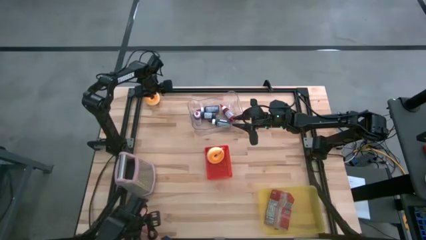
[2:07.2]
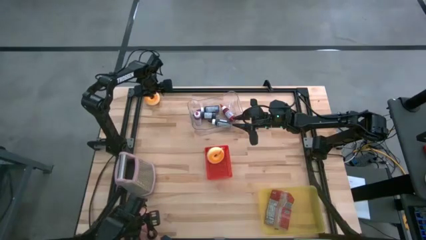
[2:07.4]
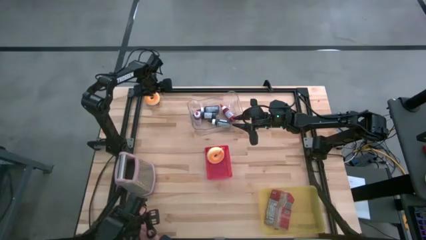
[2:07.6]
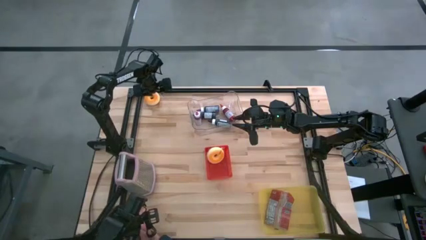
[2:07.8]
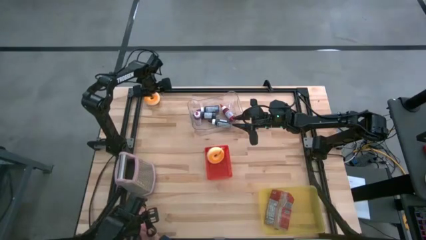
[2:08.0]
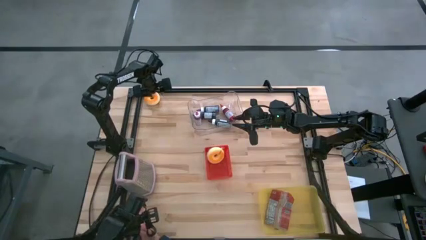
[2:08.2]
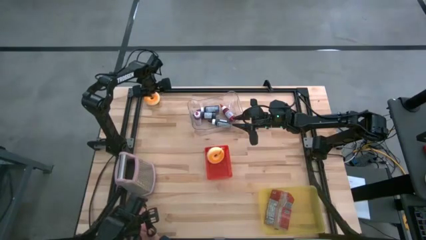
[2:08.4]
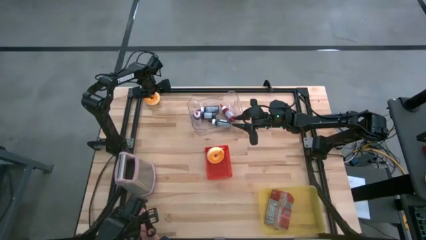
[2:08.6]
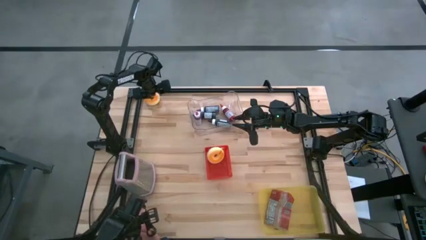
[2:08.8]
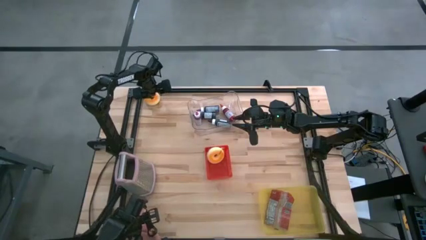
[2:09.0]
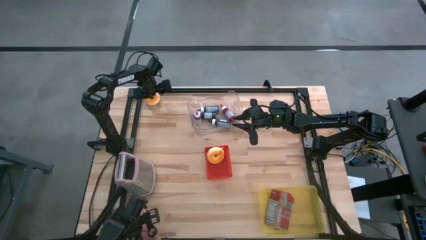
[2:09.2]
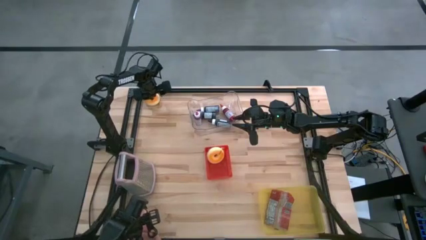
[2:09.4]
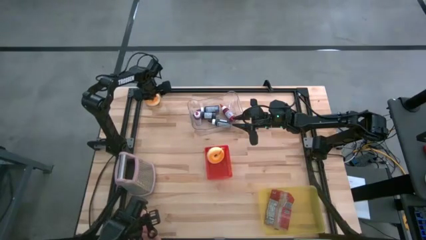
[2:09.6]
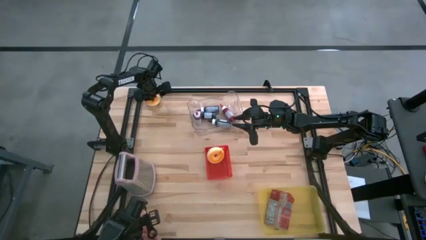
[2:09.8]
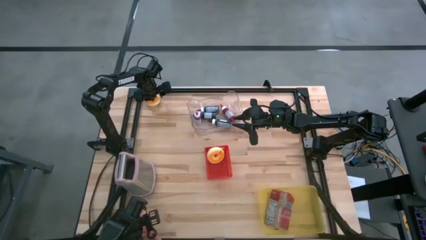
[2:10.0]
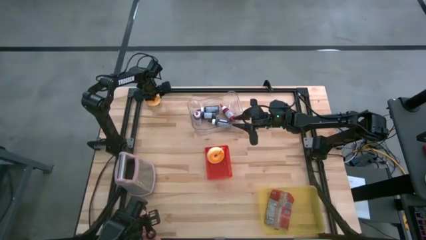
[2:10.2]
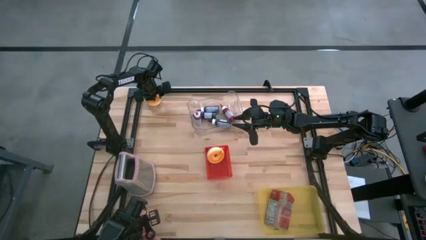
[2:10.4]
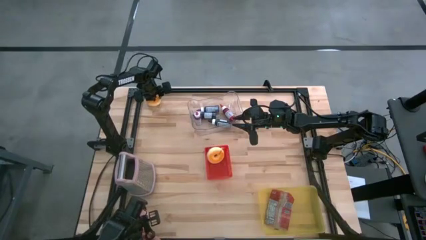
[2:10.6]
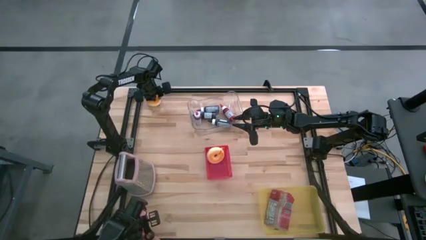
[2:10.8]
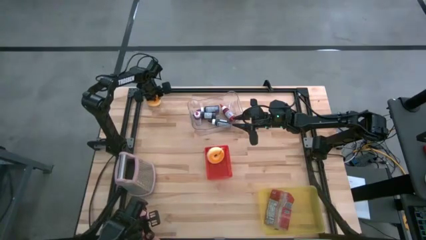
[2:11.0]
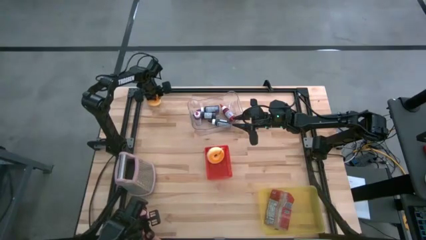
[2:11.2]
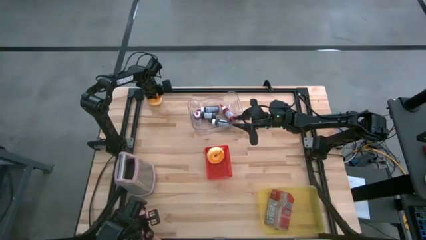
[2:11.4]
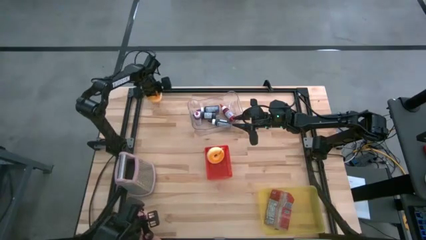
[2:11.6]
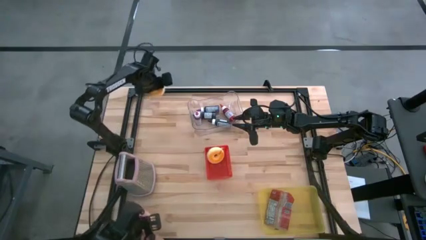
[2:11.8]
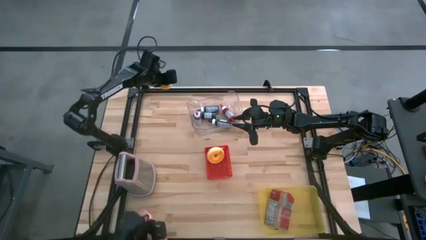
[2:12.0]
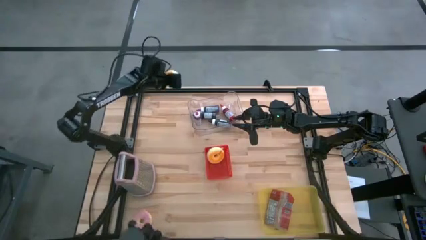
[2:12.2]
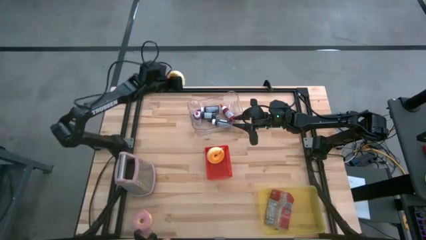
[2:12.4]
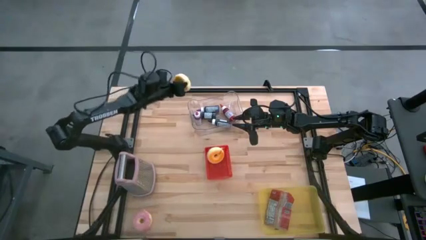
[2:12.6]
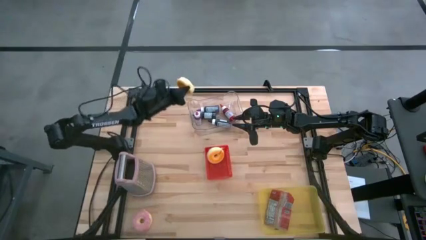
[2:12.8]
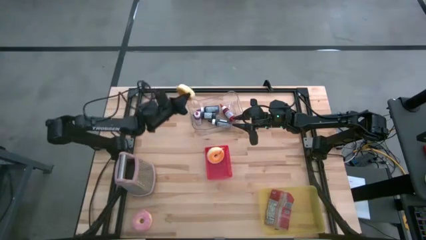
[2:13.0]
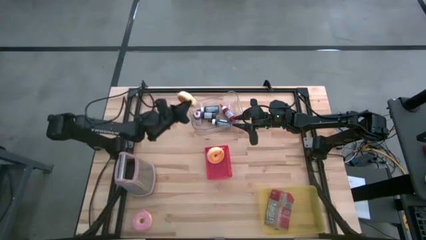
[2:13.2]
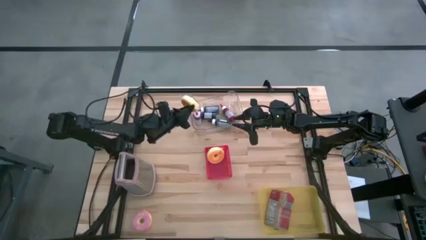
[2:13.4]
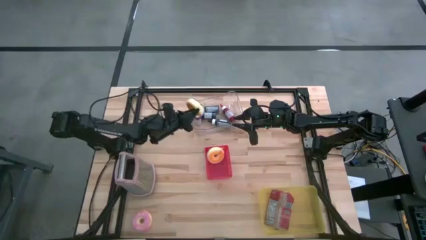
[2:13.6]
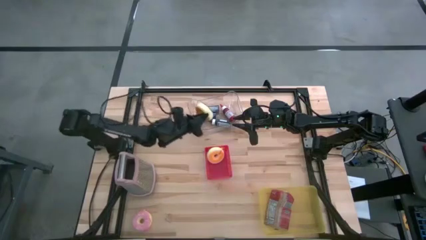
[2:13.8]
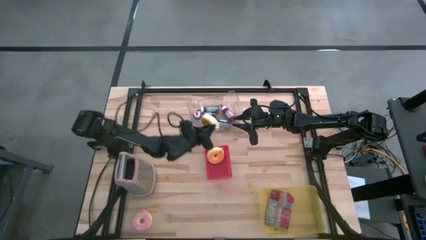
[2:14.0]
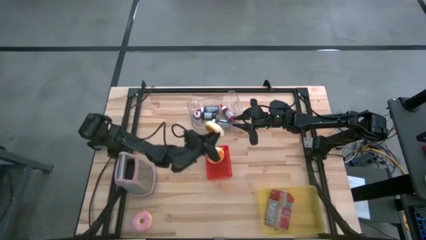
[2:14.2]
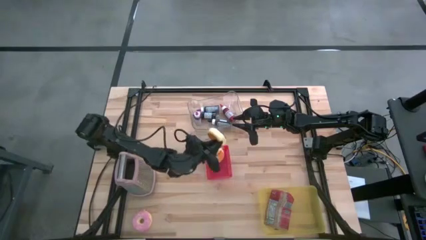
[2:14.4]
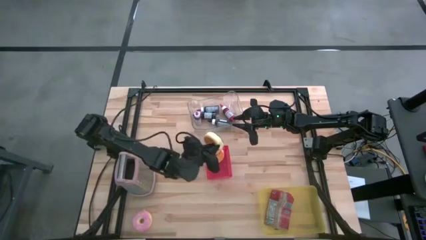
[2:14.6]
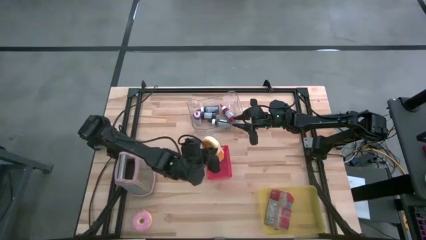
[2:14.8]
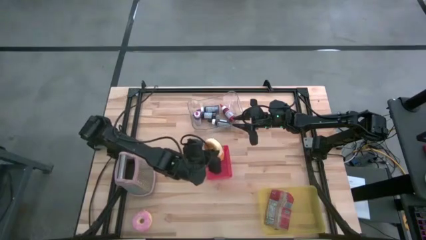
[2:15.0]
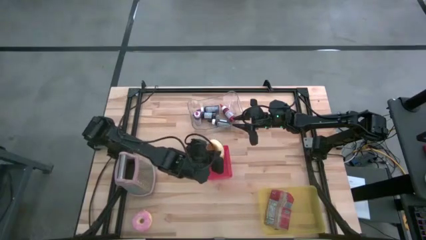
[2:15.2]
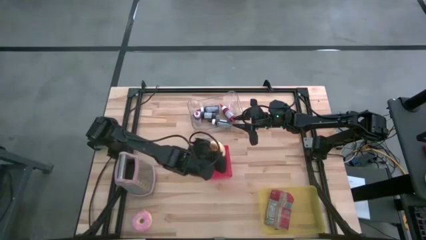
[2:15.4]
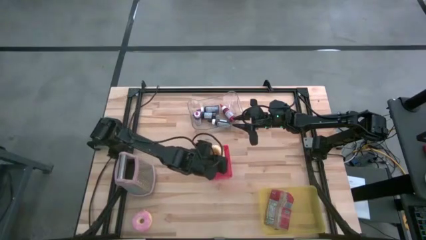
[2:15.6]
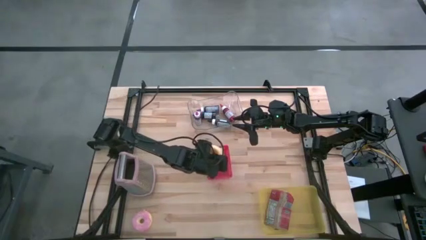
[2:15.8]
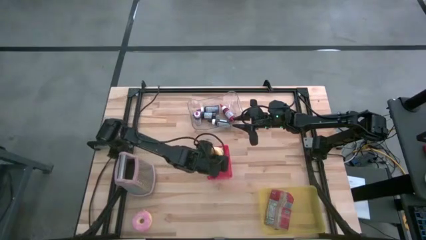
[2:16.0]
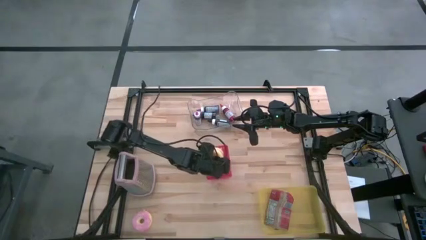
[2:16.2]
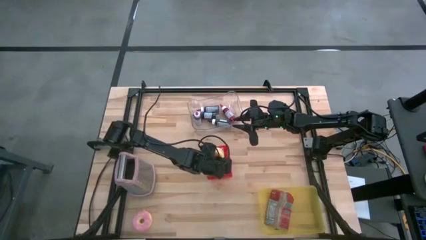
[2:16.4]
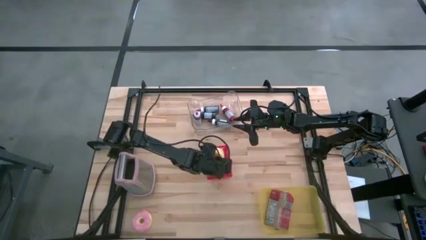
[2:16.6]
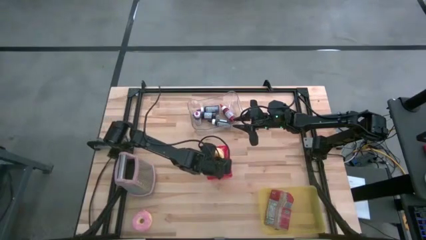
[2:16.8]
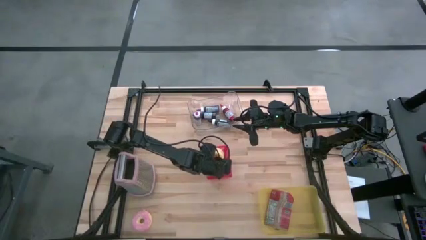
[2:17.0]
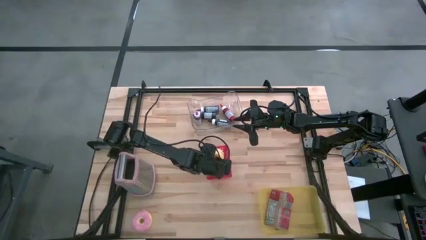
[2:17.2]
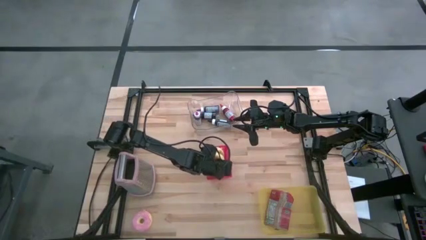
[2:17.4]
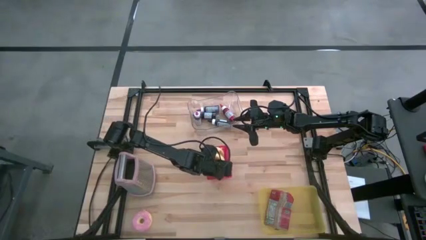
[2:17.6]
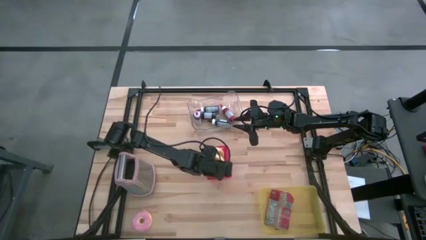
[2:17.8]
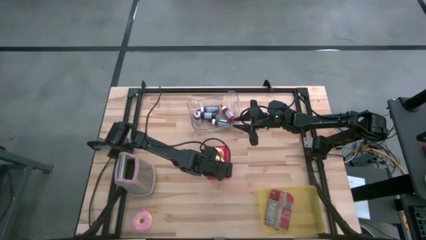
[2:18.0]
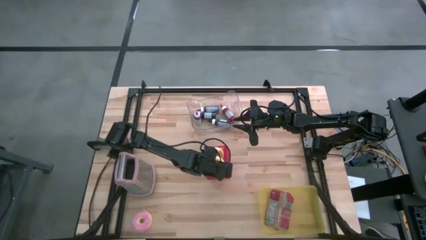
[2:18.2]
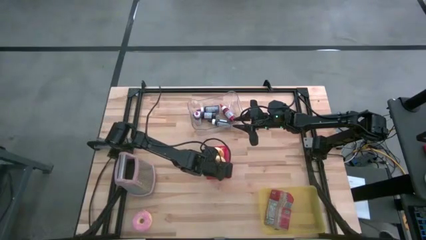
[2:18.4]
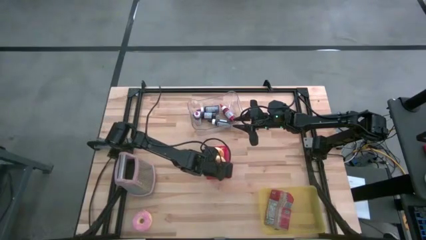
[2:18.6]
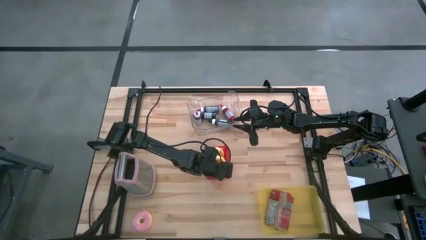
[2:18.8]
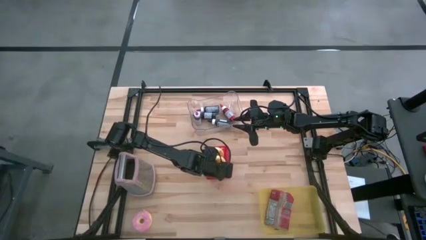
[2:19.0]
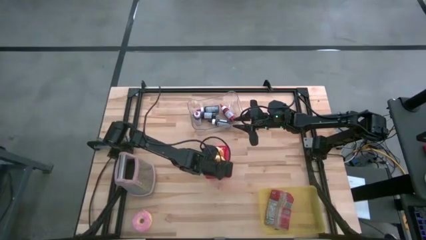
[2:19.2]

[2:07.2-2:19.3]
Task: Pick & Place Food Item
Put the black donut into the red bin

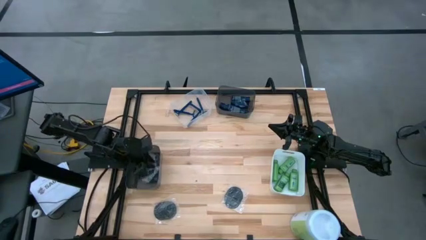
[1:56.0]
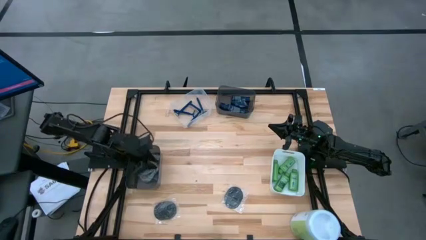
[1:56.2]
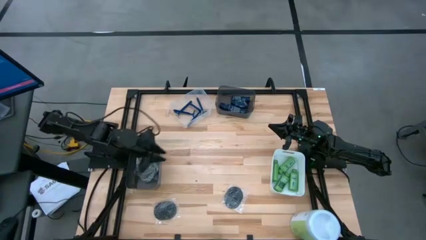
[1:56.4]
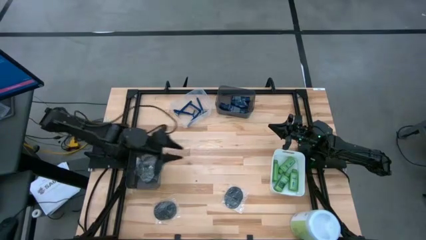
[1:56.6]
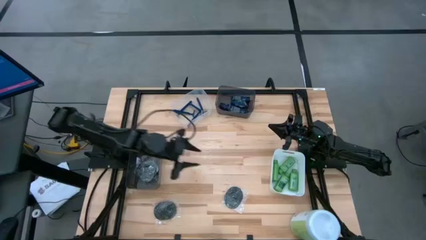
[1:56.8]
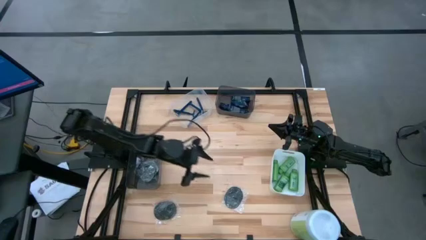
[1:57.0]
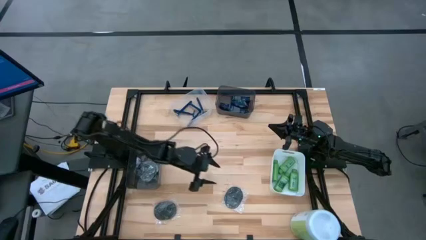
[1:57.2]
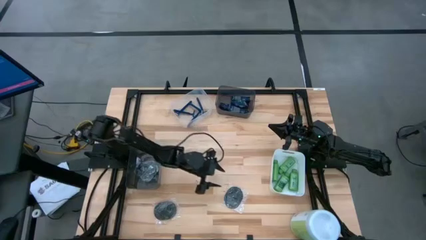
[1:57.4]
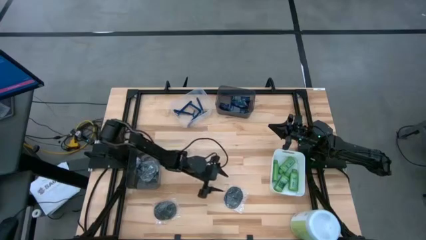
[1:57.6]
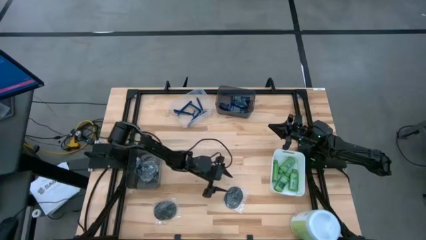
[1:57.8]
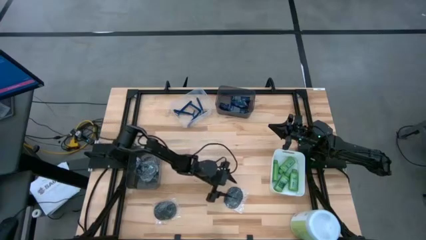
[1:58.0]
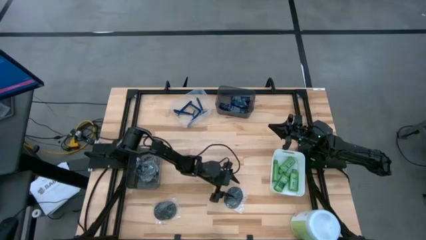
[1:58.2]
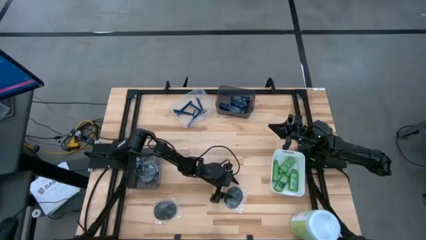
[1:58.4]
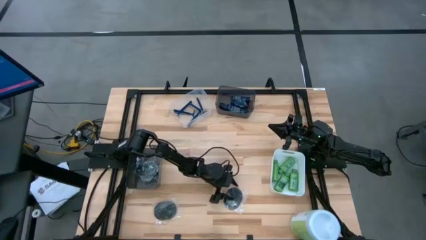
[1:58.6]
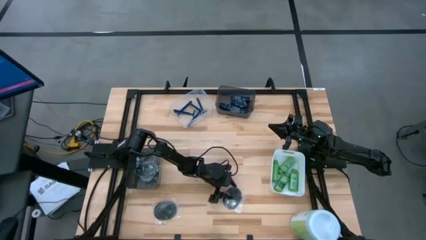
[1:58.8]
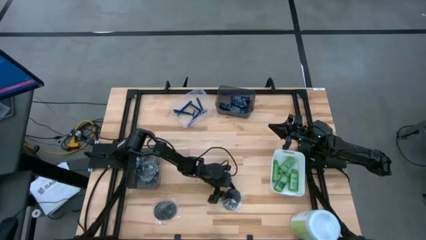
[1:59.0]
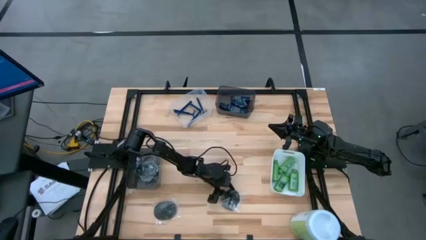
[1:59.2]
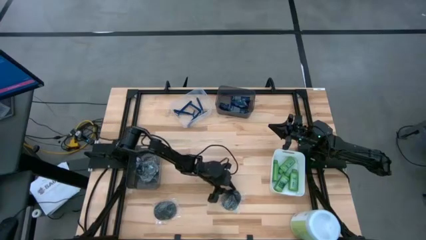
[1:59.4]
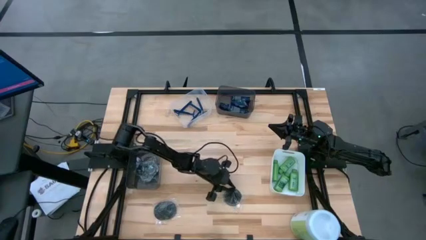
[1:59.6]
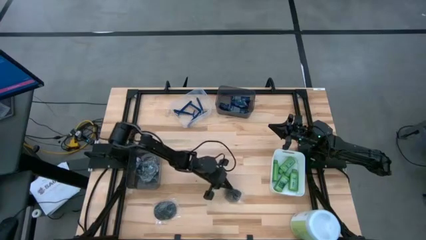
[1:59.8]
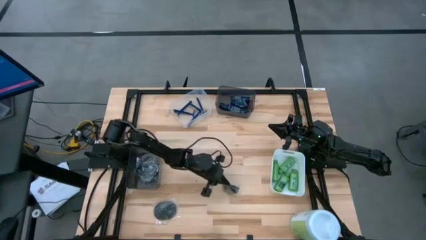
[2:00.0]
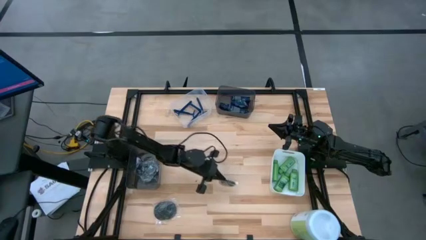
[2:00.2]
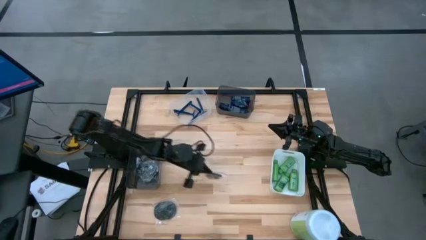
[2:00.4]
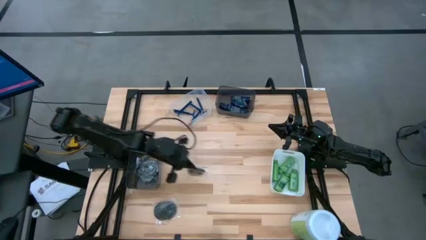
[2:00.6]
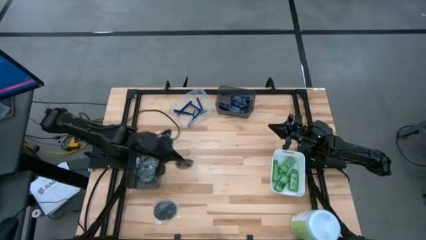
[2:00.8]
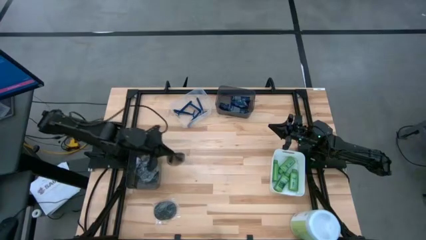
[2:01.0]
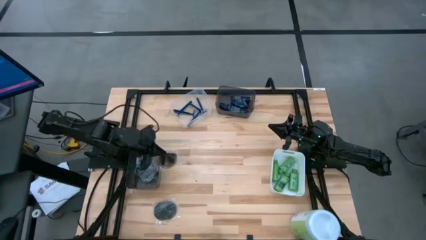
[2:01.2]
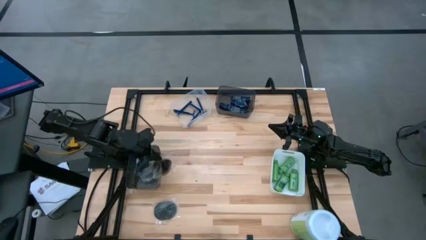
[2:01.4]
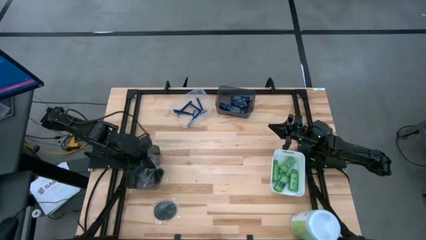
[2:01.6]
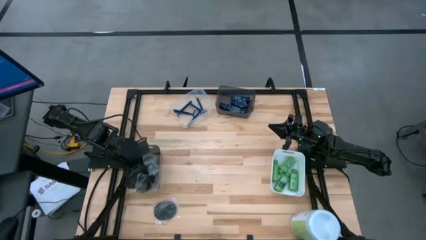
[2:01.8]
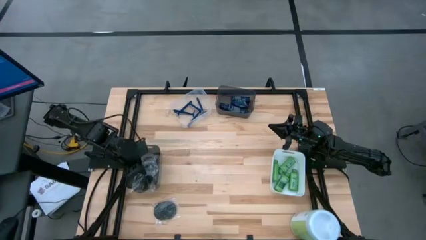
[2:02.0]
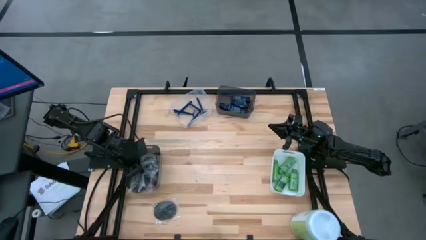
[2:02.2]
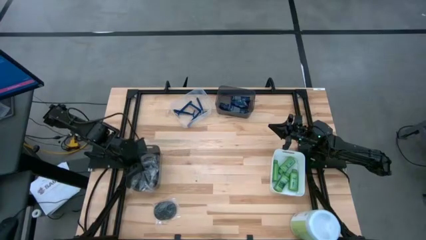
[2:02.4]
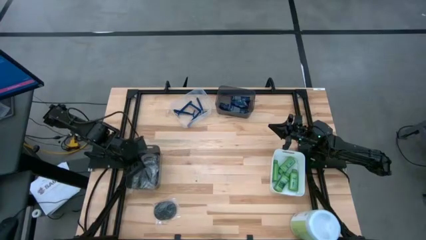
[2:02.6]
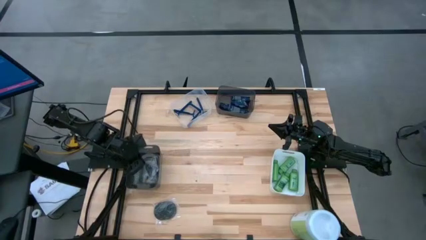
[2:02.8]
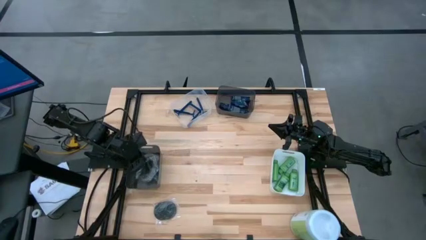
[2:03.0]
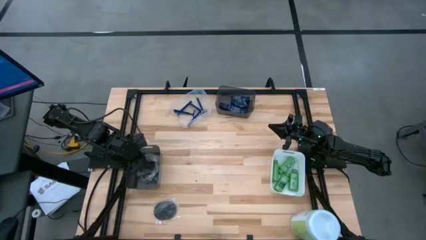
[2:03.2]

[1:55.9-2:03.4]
Task: Pick & Place Travel size toiletries
Put the black hairbrush into the bottom black bin
